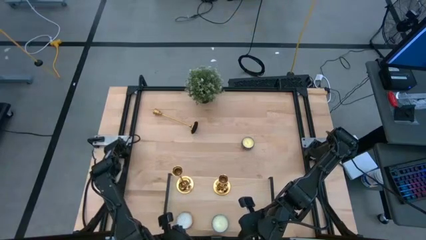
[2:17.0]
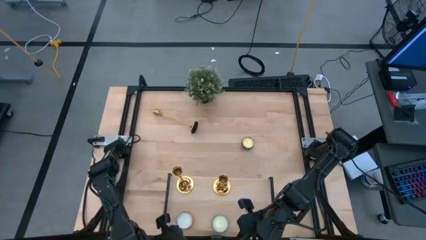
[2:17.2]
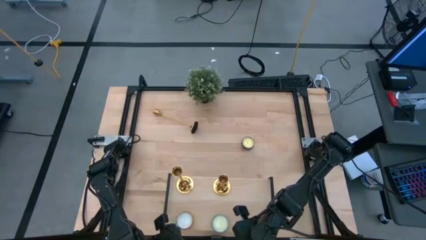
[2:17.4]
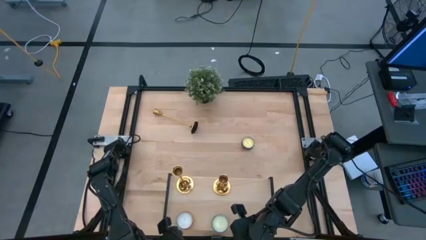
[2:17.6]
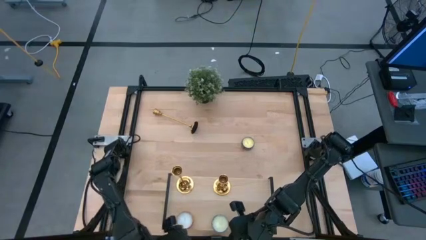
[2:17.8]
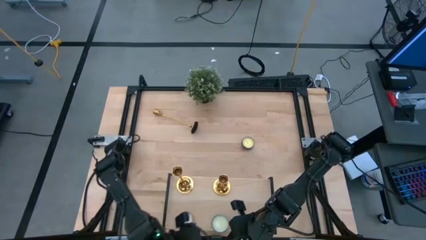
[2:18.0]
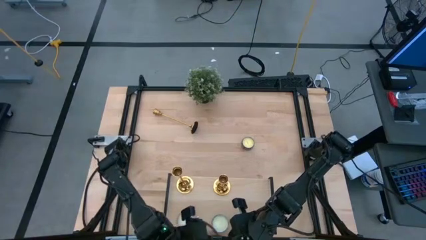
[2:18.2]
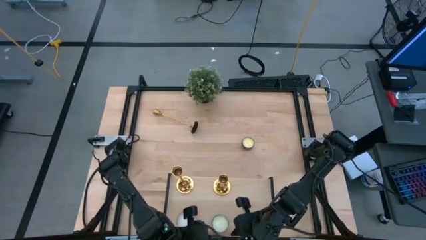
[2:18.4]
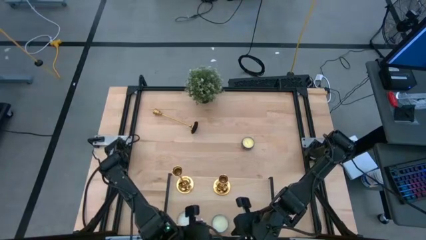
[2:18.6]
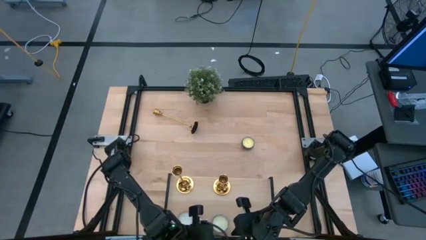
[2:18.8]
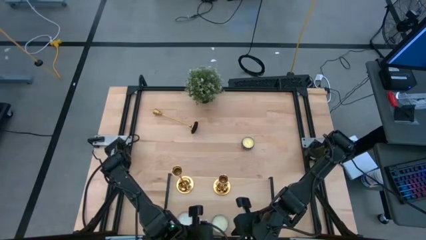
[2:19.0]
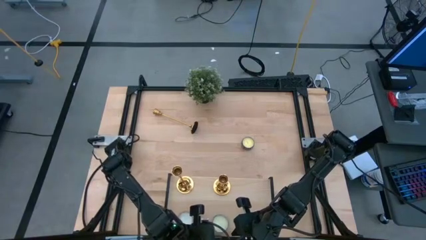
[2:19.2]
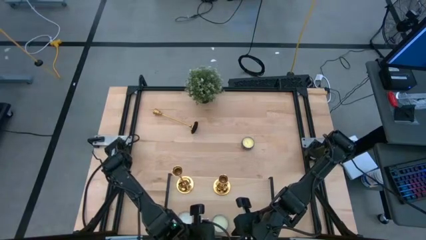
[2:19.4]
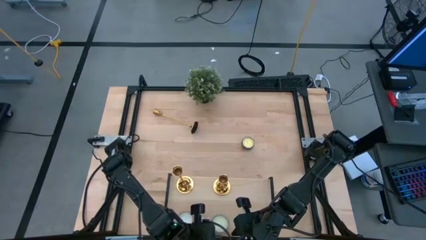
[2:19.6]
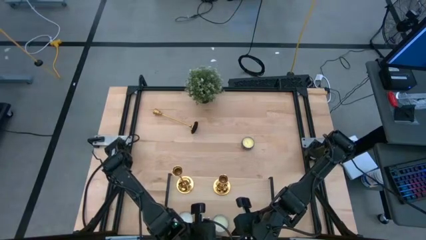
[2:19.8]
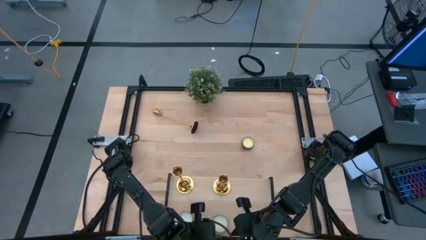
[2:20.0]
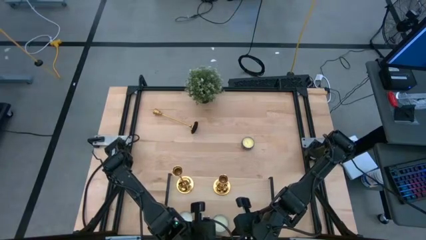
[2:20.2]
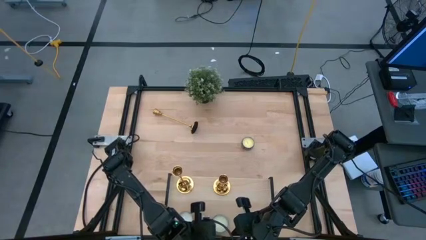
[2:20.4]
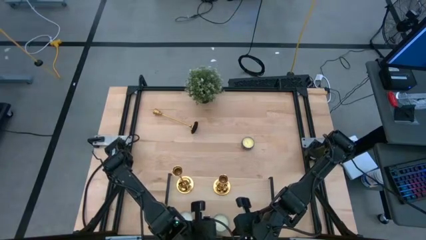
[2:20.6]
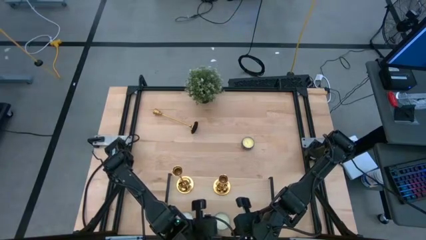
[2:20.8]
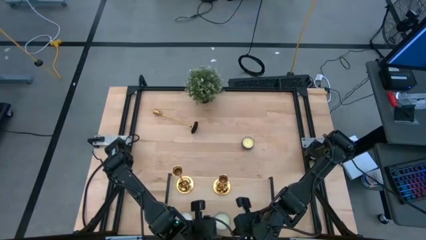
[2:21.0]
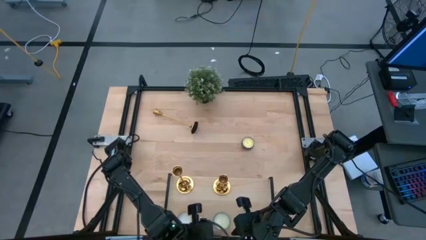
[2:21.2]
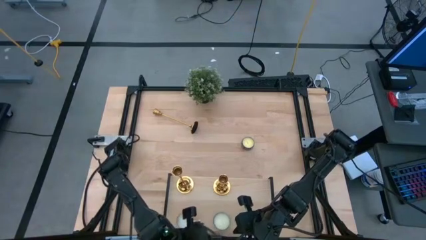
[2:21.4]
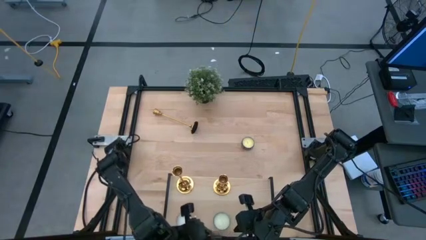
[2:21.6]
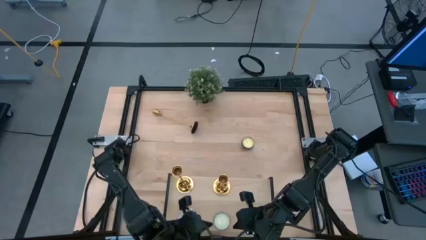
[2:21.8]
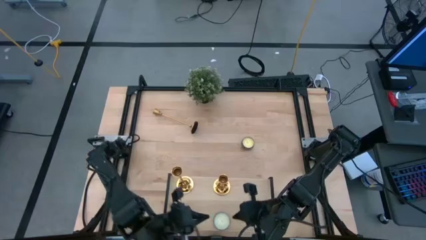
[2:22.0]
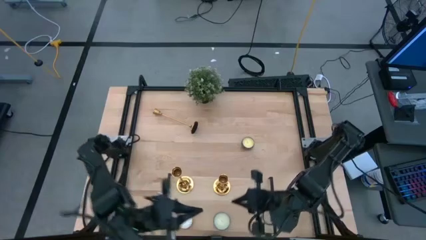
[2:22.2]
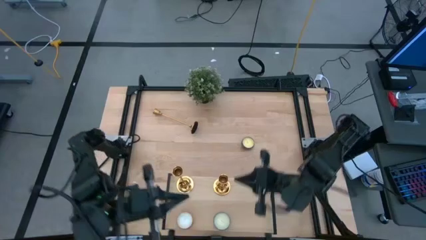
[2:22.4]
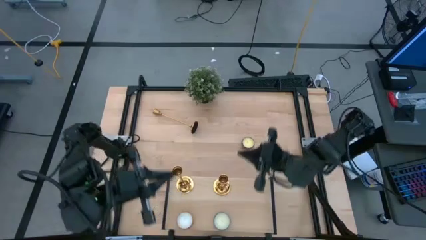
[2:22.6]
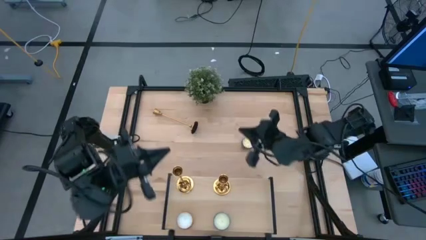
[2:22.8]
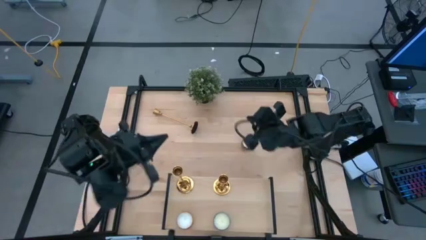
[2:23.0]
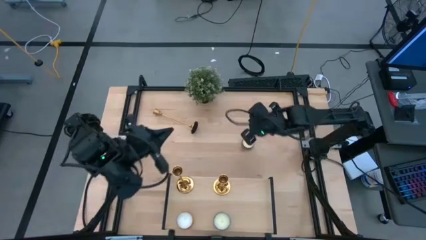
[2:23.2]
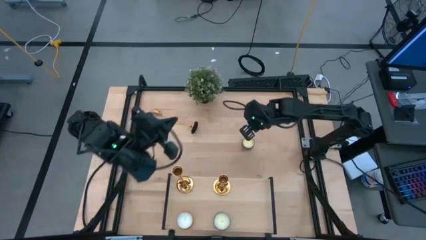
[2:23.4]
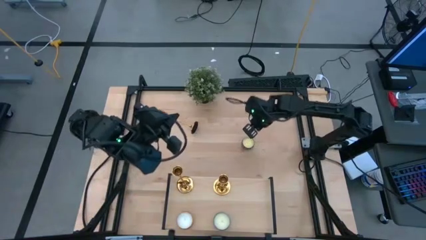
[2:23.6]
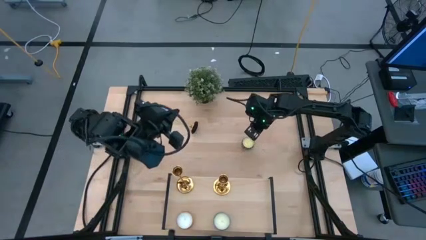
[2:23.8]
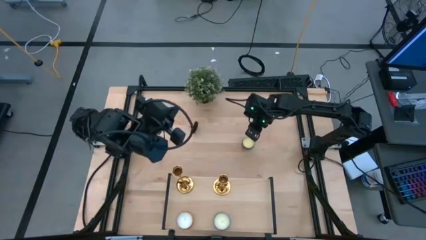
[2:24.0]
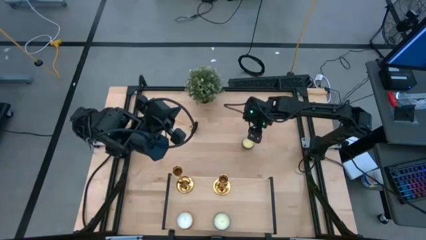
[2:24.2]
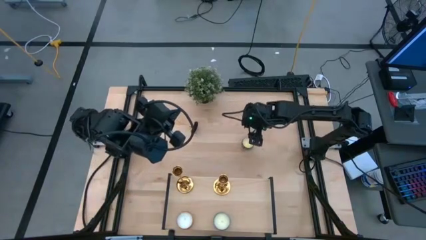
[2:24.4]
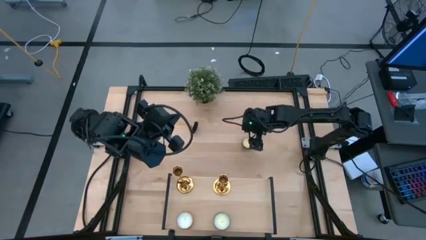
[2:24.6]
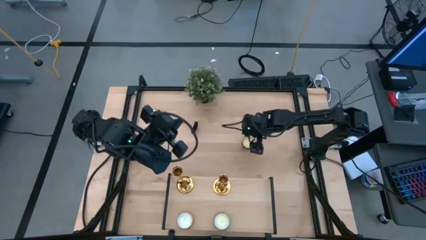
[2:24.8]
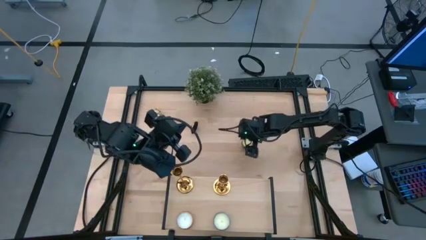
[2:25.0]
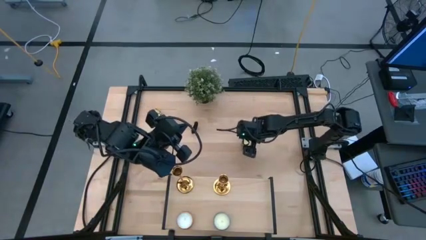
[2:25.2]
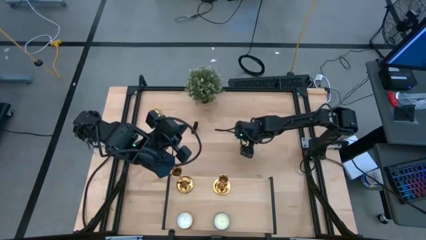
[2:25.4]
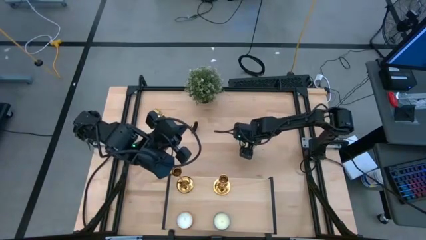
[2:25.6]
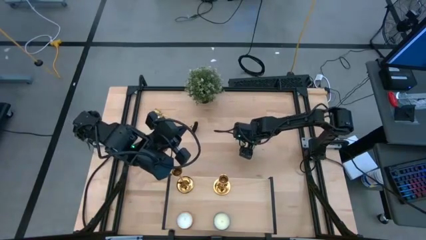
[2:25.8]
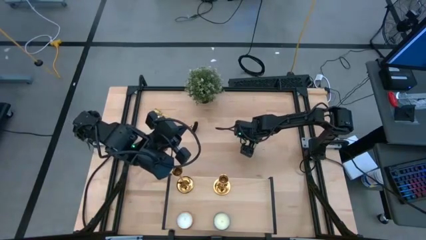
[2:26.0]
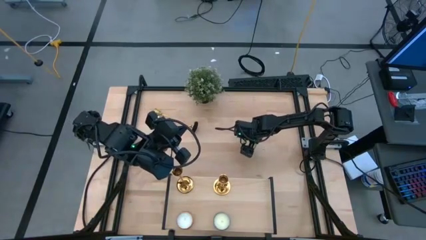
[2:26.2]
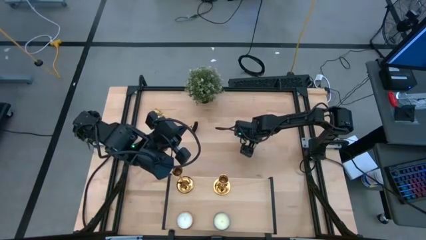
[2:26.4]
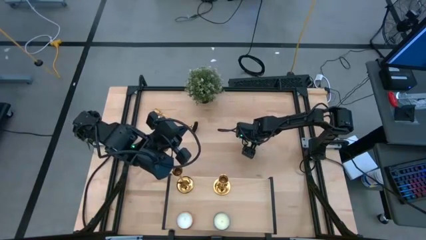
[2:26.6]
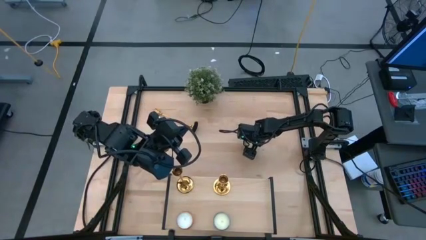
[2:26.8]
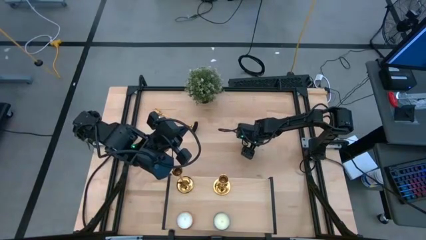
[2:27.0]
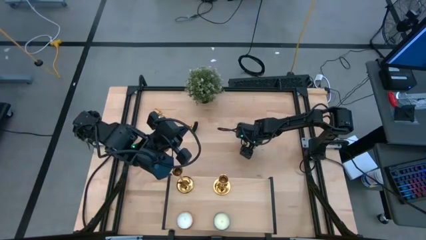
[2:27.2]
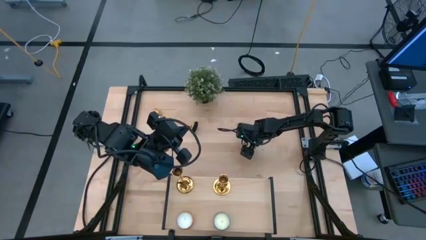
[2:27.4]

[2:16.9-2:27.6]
Task: Pick & Place candle stick holders
Put the red scented candle on the shelf

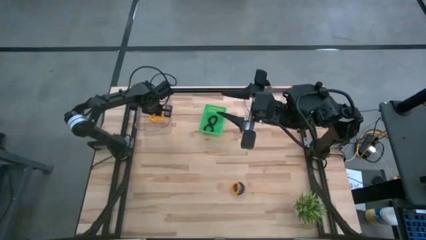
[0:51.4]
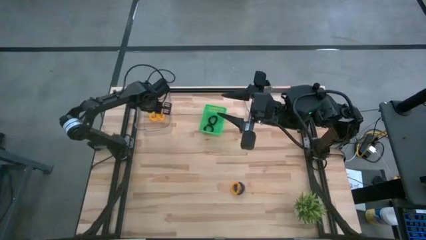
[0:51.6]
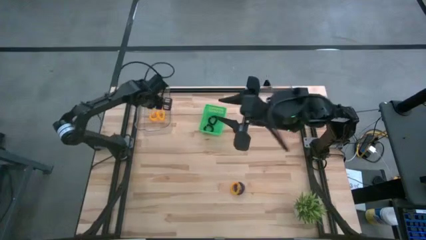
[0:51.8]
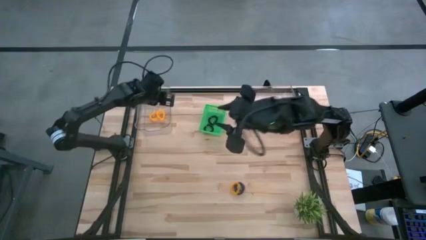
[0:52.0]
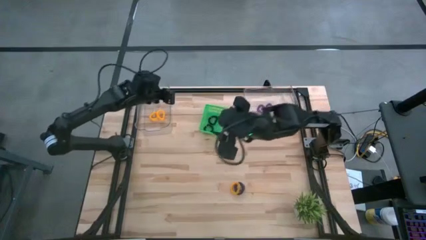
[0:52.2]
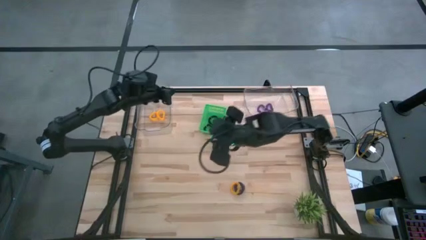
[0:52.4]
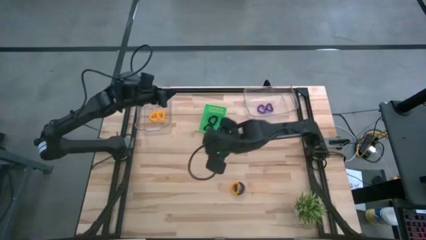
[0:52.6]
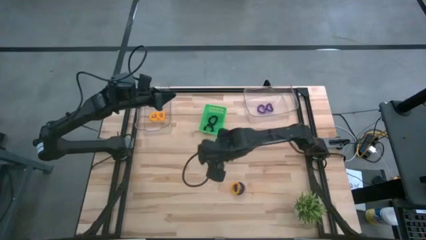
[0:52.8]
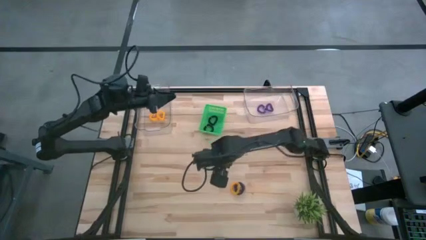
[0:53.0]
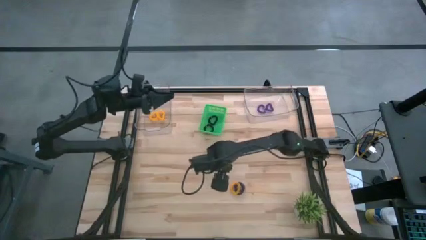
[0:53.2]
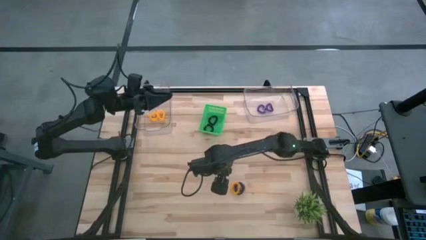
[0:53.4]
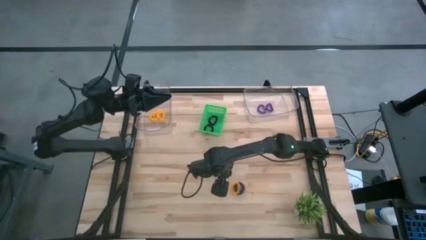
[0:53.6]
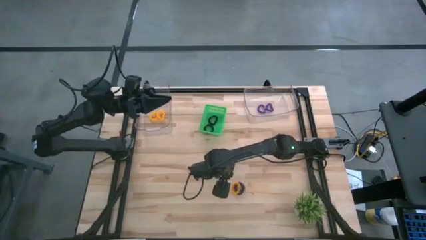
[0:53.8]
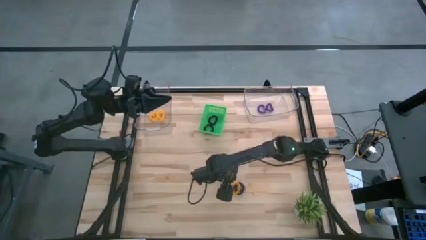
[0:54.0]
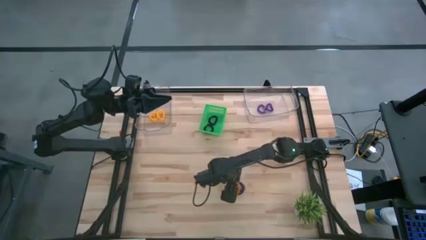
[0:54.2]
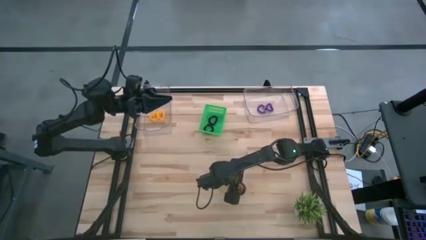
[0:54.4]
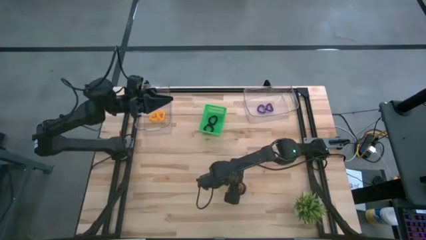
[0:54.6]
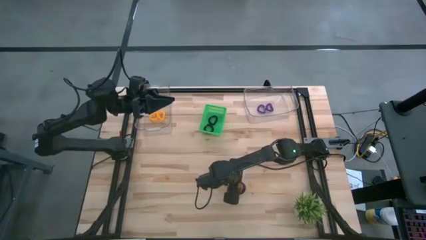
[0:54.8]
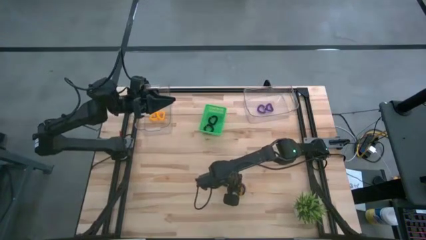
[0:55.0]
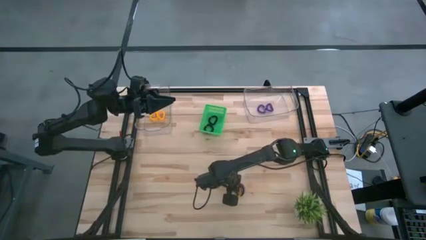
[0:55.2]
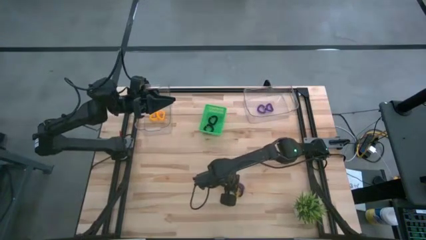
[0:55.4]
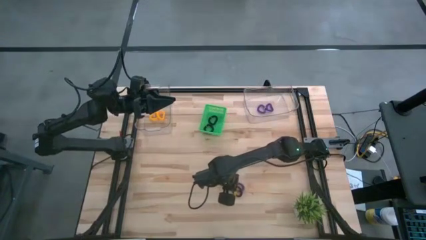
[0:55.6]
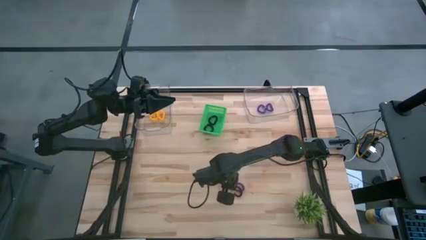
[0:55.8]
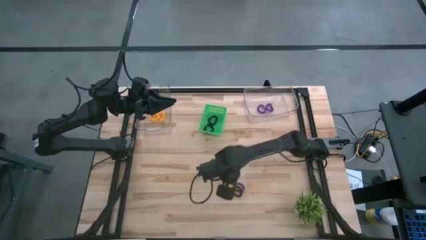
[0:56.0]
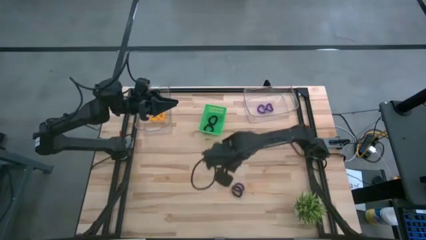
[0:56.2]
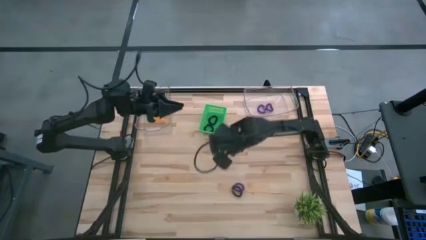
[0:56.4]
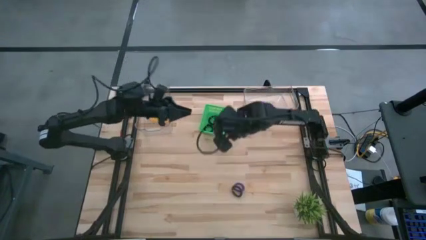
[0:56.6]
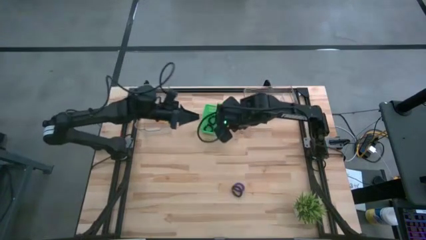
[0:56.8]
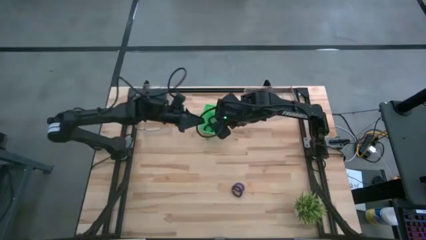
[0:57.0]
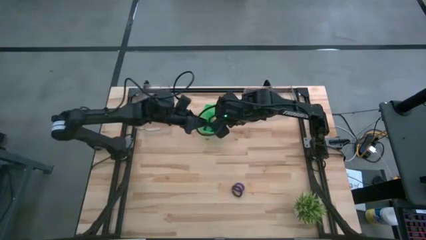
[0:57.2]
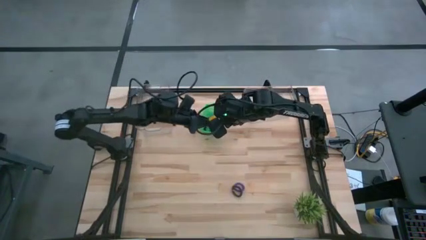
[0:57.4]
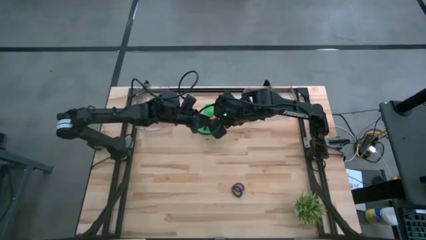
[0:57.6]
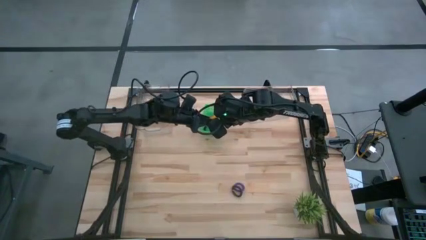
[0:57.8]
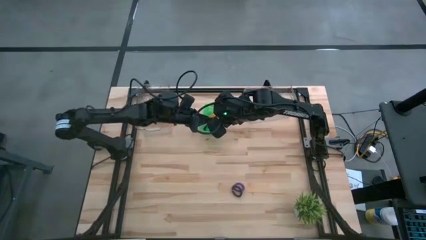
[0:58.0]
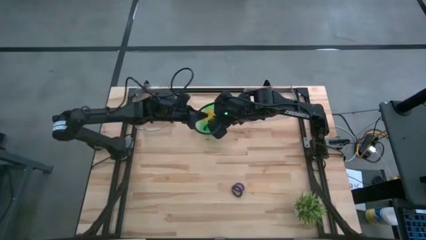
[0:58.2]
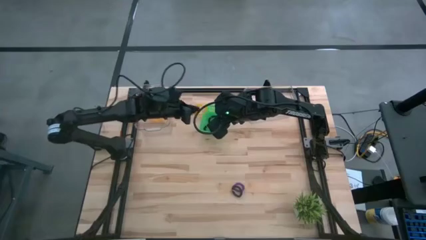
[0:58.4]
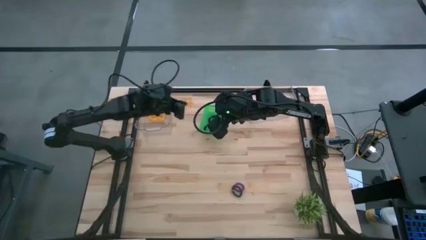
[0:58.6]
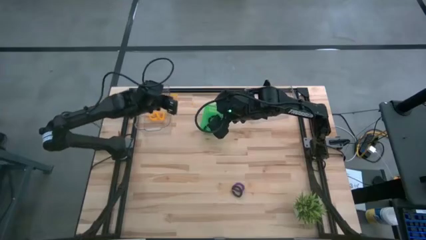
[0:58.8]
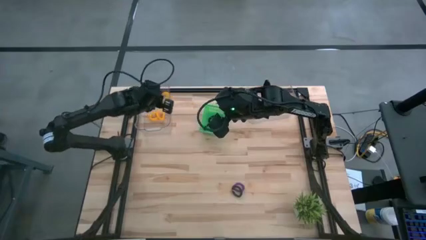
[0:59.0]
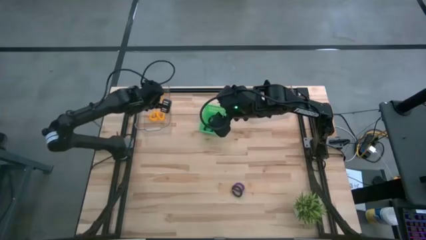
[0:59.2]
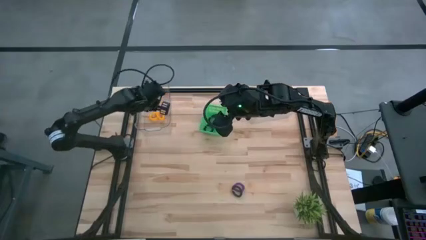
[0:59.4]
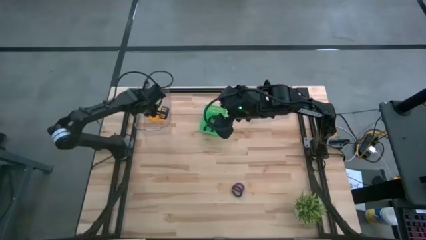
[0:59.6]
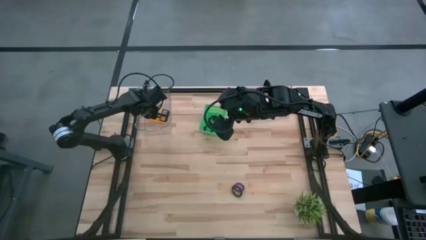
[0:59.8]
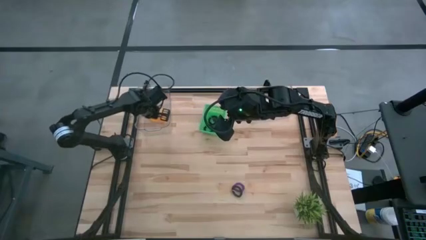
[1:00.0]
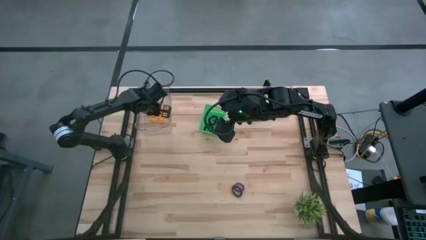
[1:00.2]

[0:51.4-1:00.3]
Task: Sort spring keychains
Put the yellow spring keychain into the left transparent bin
